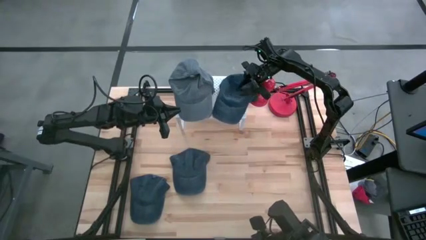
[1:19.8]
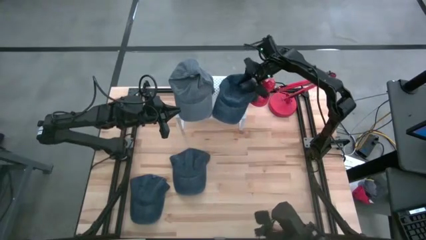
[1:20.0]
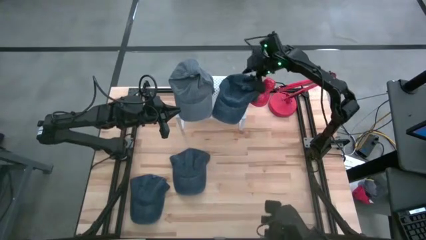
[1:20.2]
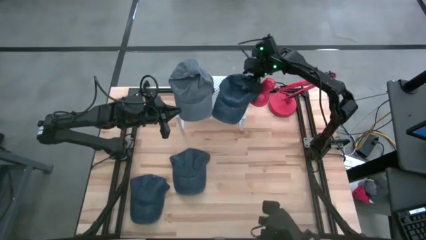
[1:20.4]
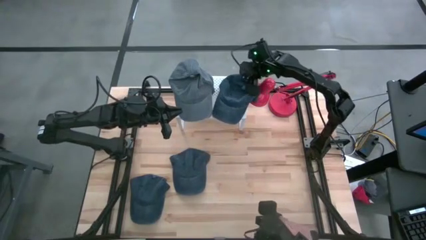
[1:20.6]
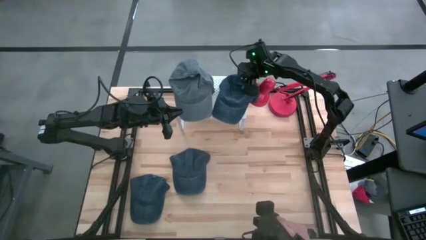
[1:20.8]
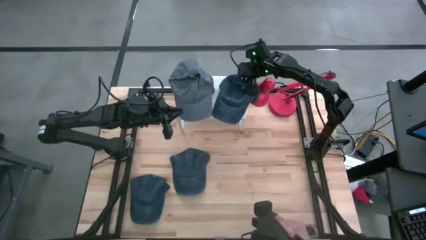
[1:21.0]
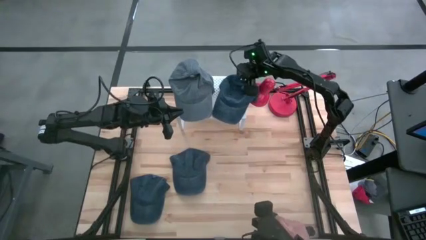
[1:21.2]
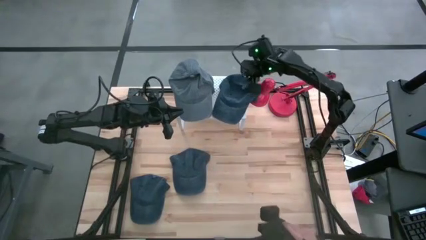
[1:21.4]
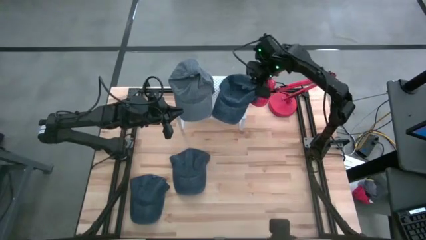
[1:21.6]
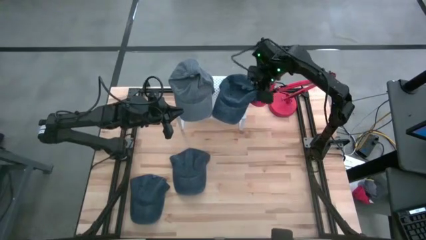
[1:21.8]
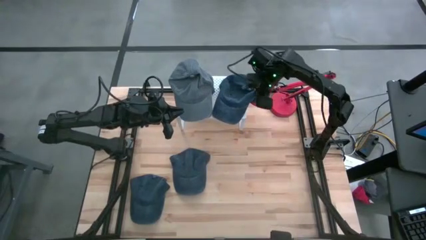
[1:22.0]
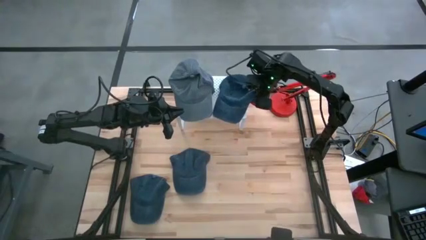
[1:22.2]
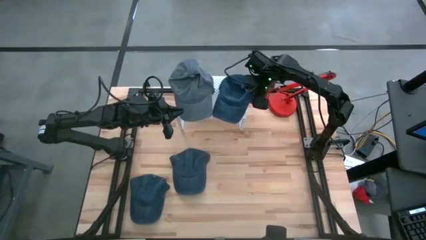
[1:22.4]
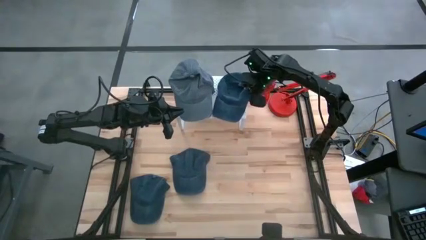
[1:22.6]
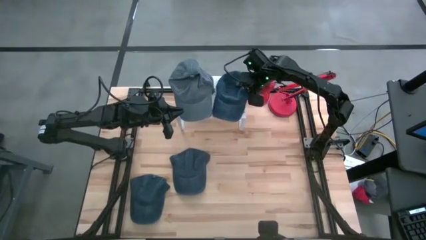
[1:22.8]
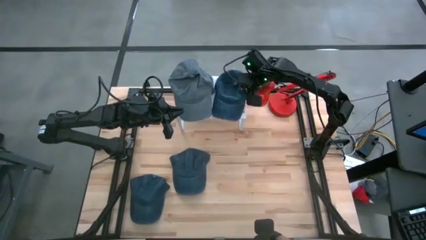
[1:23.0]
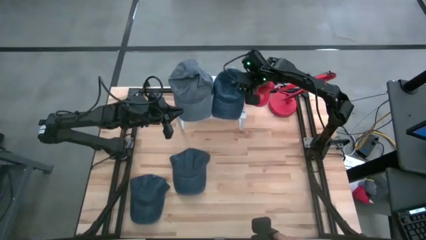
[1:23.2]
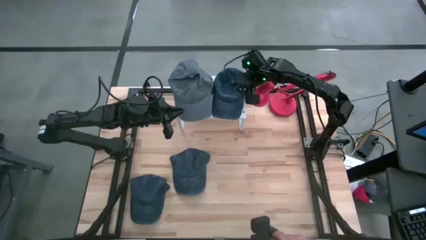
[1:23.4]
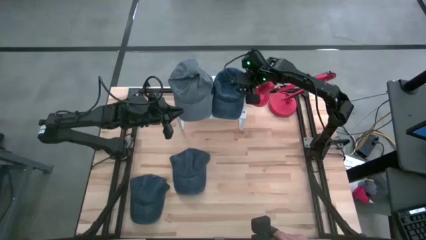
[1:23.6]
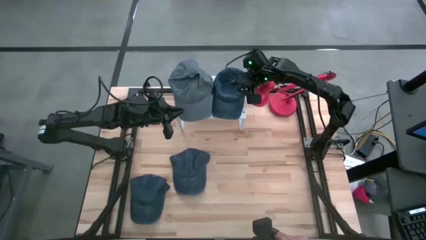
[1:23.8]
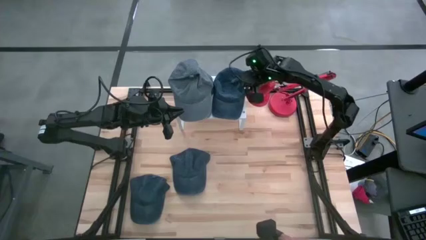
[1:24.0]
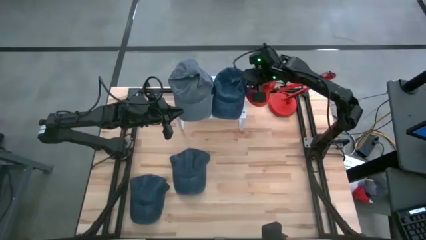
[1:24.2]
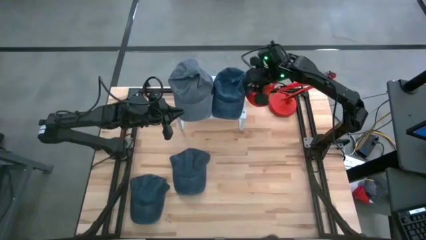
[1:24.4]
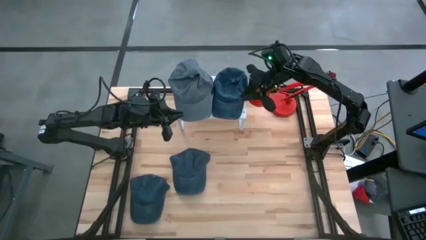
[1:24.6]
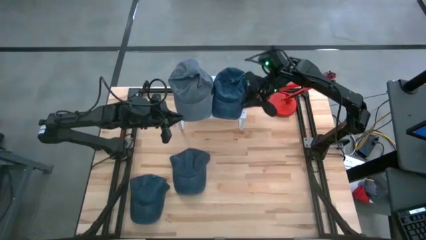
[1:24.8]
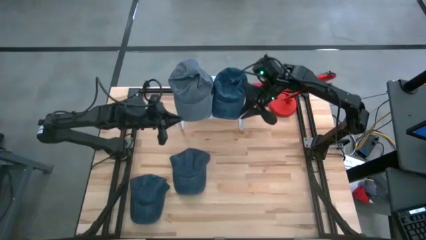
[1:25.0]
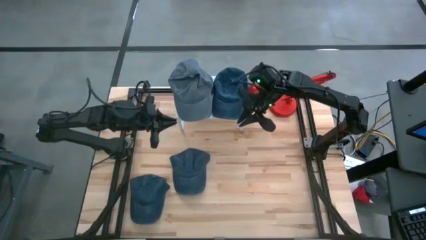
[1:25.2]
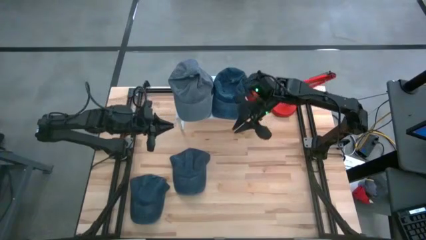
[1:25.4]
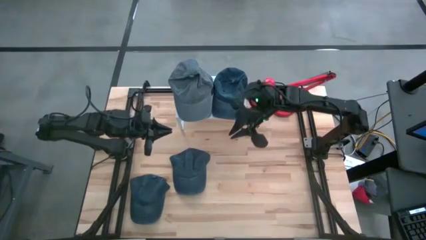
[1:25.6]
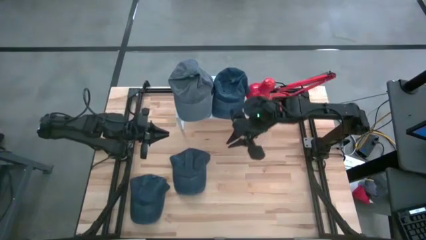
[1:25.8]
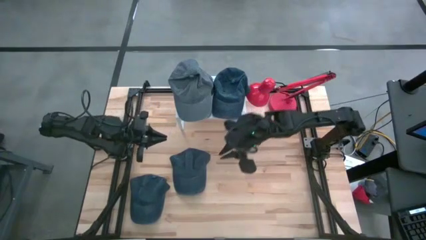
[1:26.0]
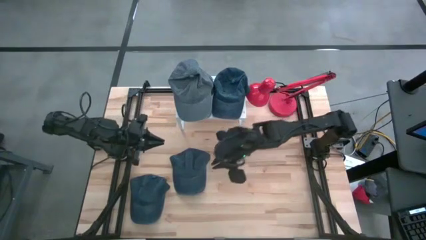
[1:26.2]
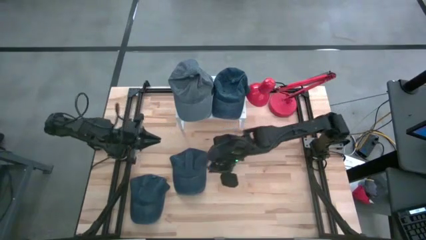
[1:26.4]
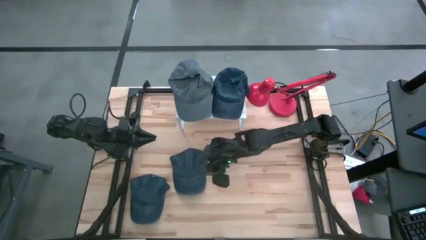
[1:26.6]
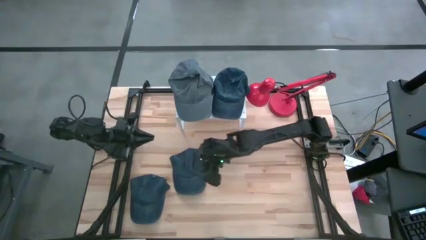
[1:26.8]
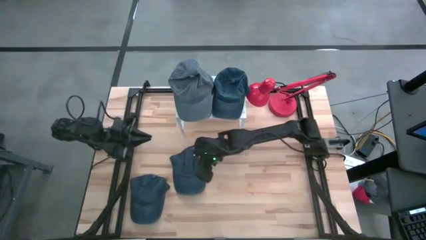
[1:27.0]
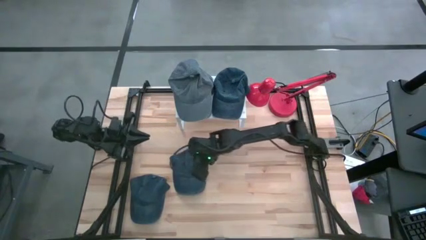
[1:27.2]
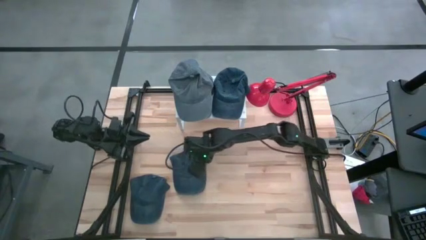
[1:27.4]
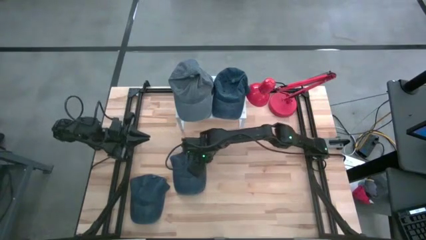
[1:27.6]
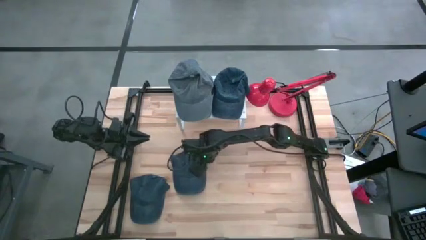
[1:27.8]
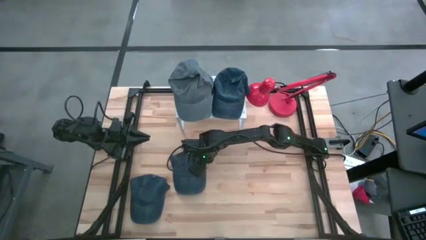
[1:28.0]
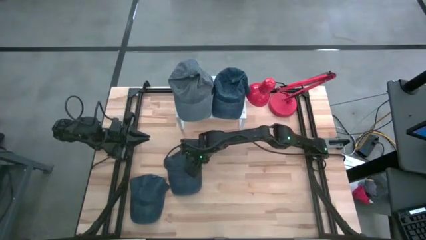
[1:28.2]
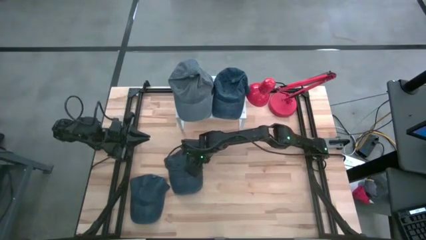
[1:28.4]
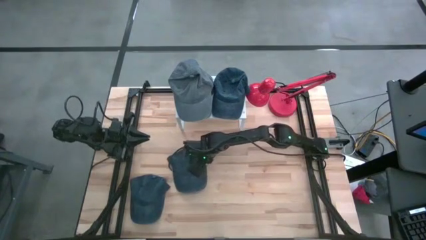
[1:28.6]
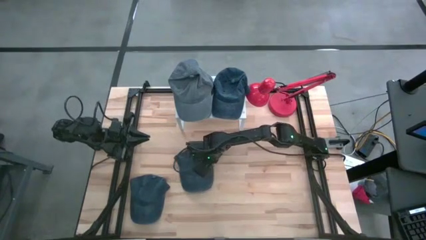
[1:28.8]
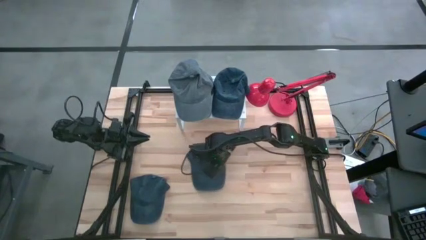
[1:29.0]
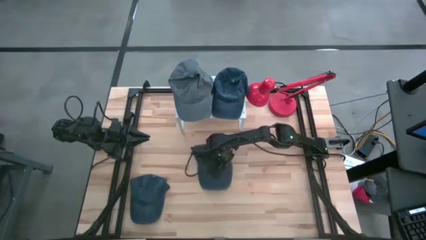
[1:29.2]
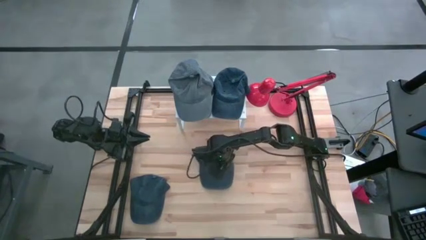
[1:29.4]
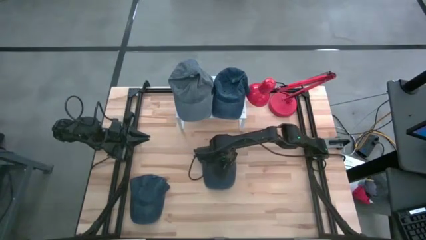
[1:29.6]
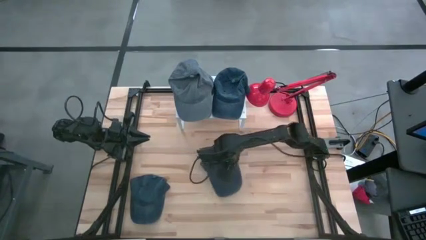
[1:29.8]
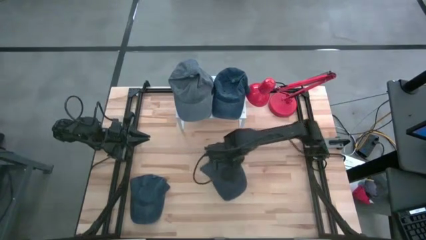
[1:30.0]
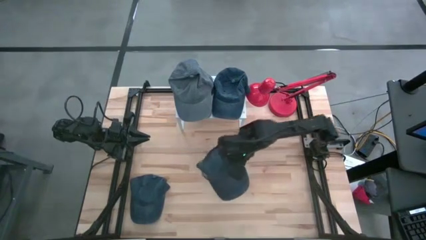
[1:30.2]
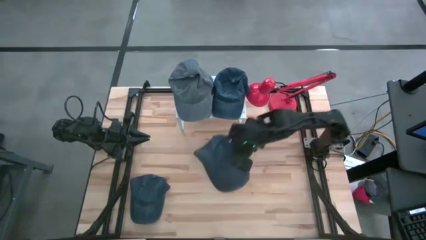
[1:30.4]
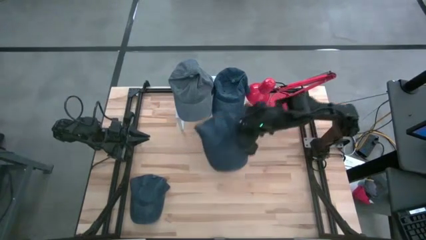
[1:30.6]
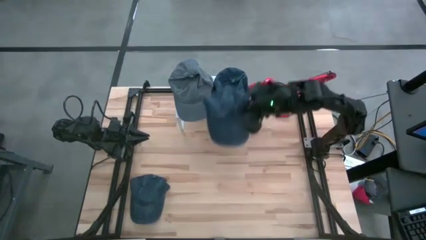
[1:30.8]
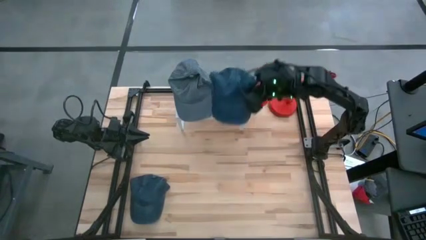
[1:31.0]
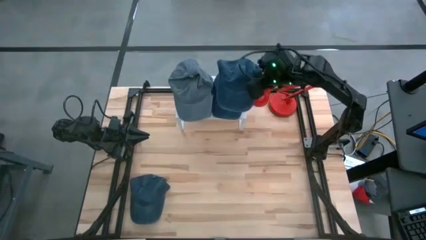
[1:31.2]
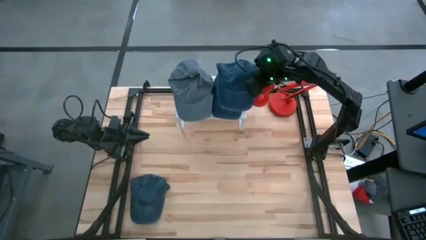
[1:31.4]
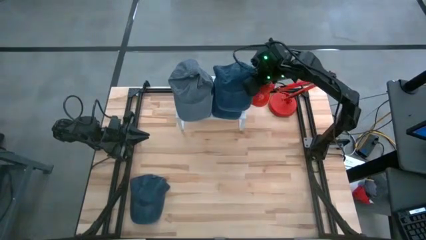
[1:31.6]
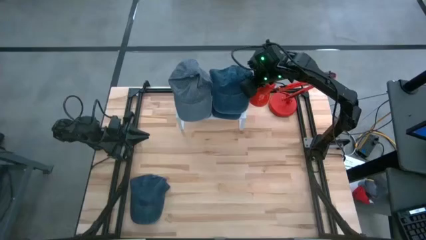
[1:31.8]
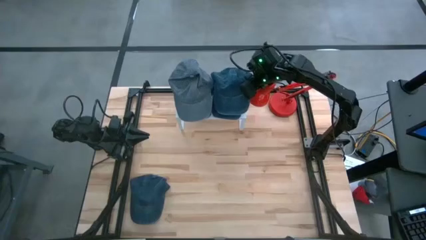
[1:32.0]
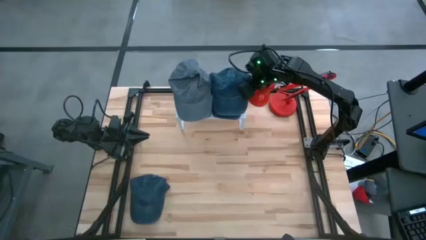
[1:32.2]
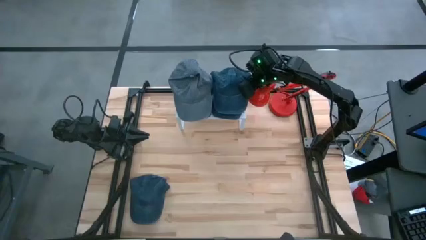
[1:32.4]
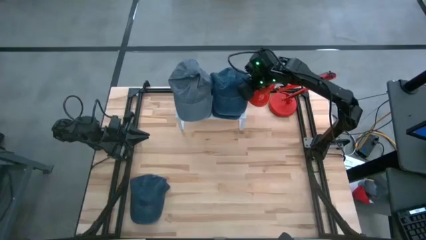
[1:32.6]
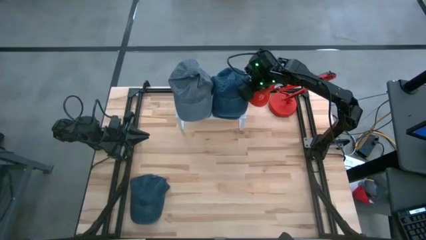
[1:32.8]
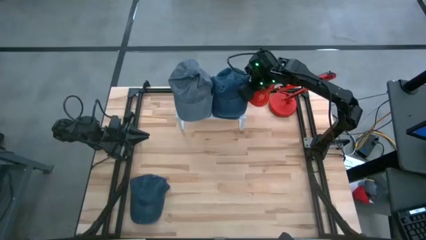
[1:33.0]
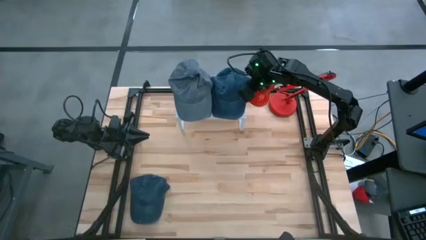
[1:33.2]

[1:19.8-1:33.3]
Task: Pick & Place hat
Stack the top blue cap on the blue cap on the shelf
